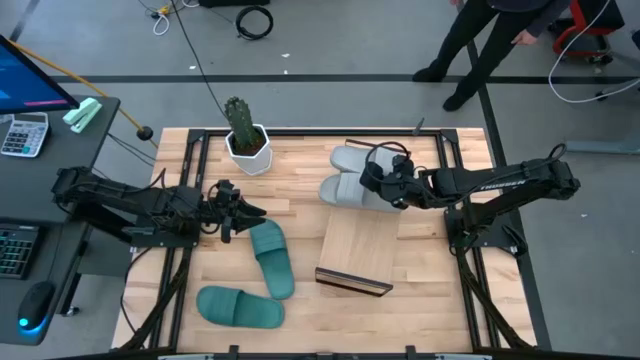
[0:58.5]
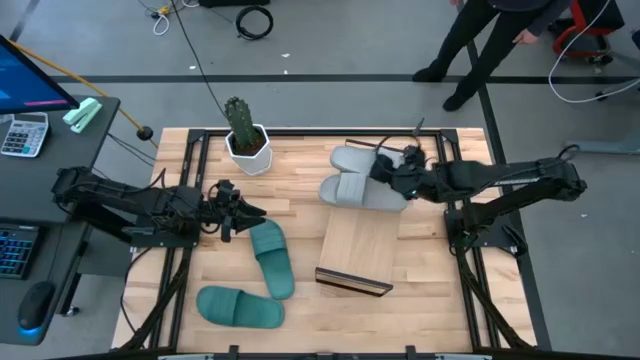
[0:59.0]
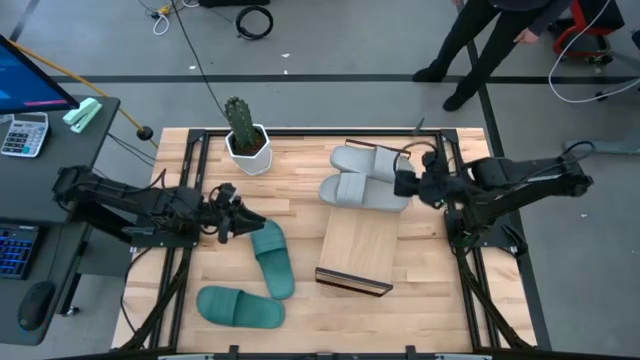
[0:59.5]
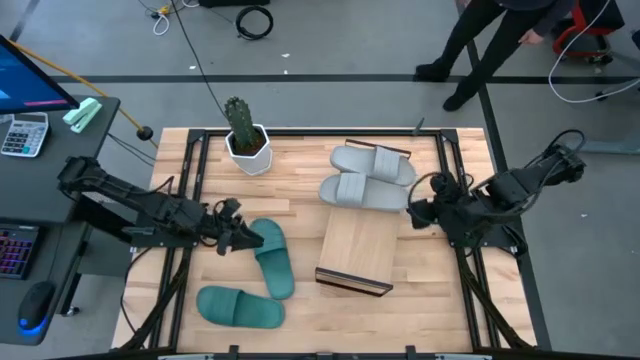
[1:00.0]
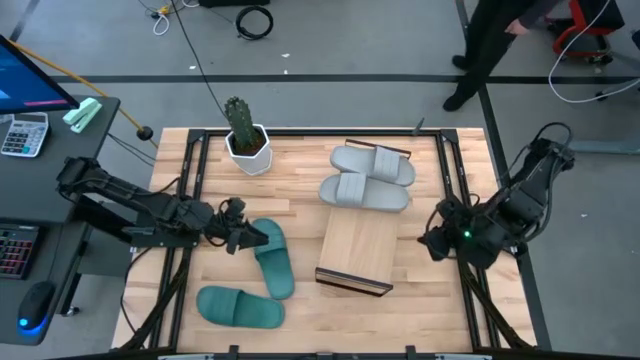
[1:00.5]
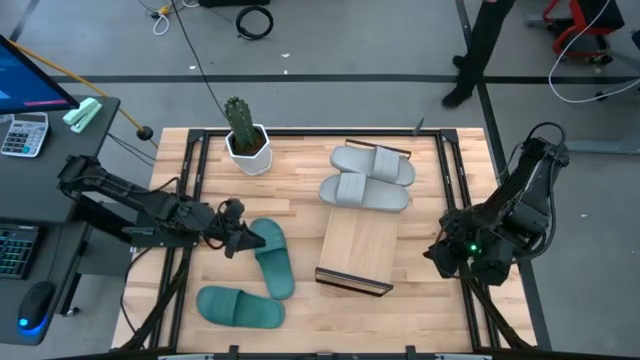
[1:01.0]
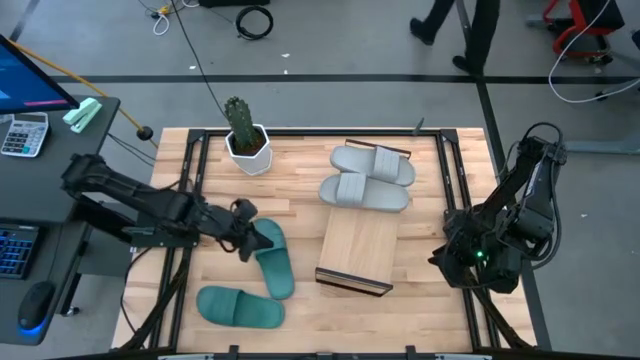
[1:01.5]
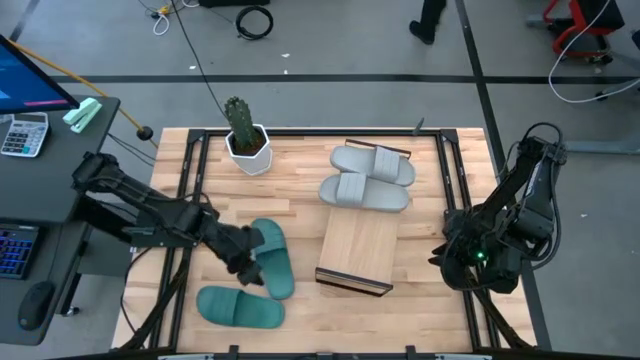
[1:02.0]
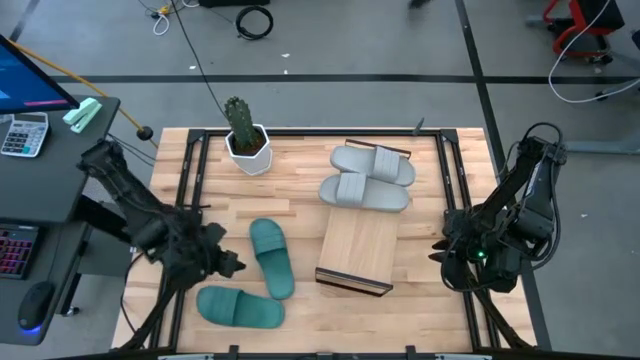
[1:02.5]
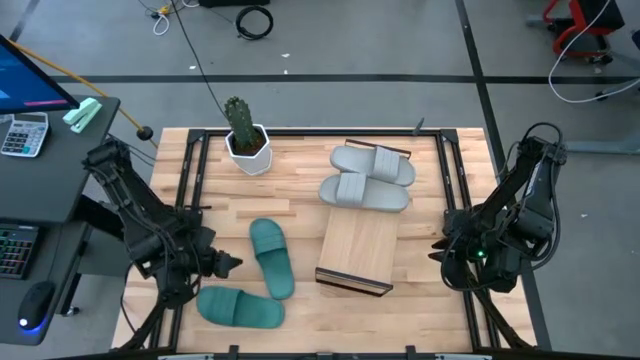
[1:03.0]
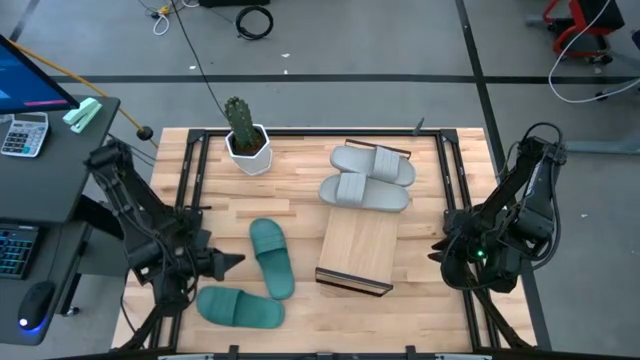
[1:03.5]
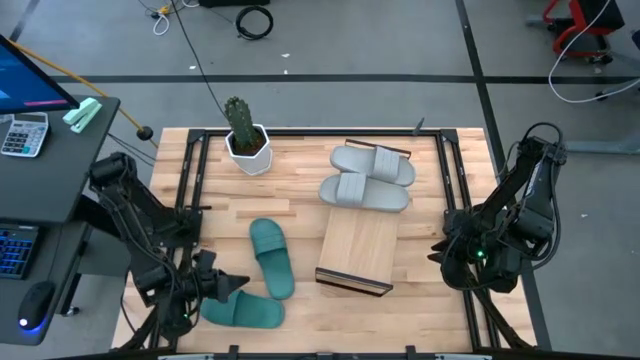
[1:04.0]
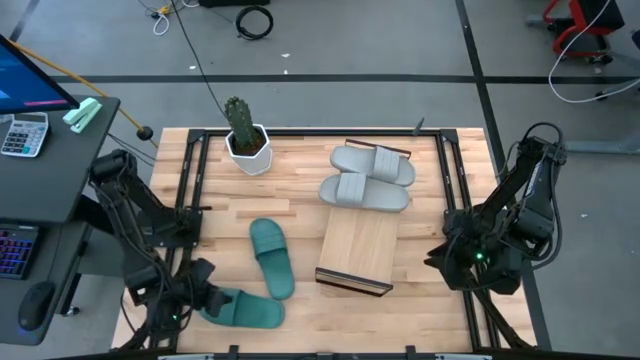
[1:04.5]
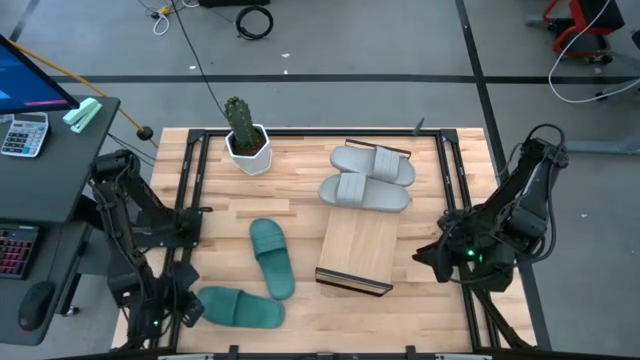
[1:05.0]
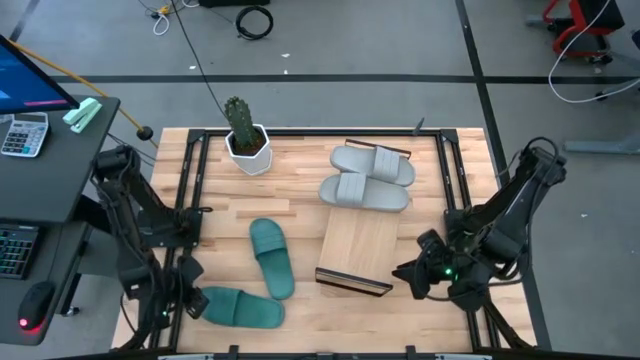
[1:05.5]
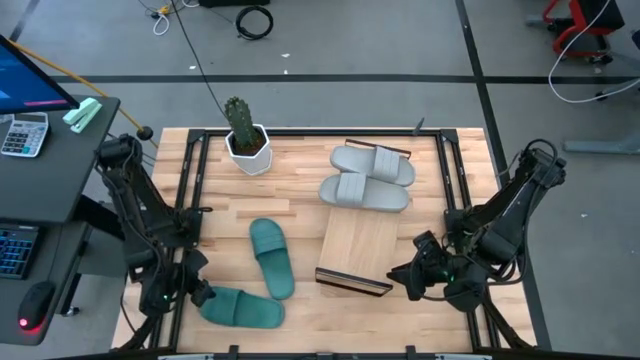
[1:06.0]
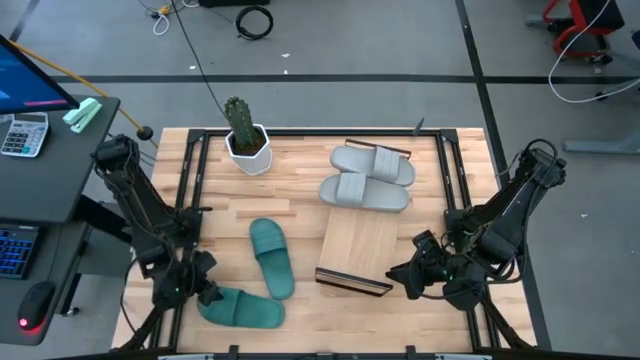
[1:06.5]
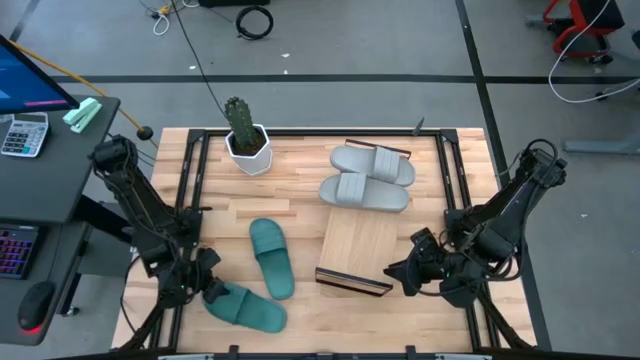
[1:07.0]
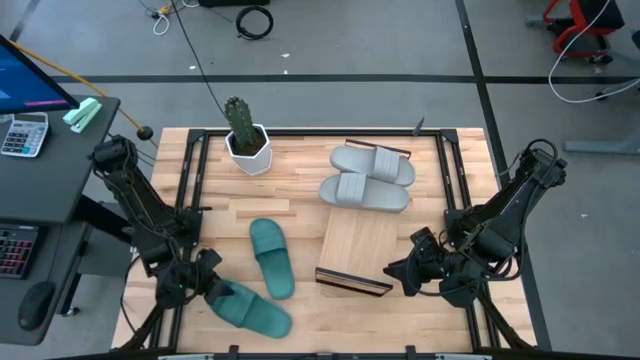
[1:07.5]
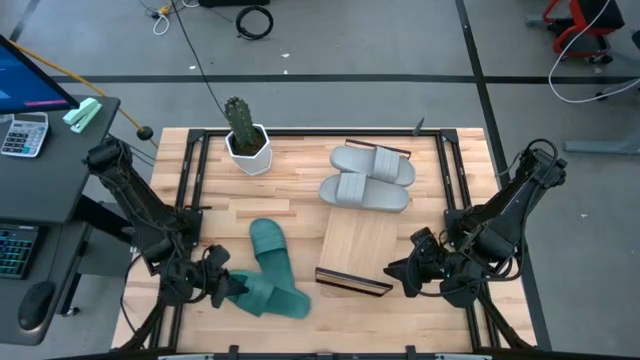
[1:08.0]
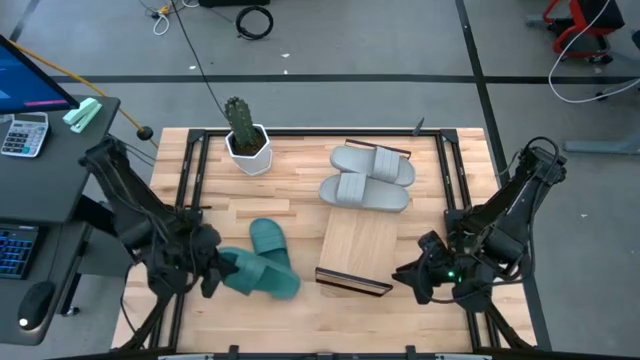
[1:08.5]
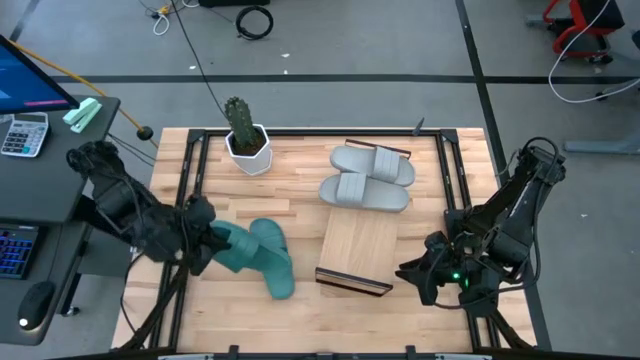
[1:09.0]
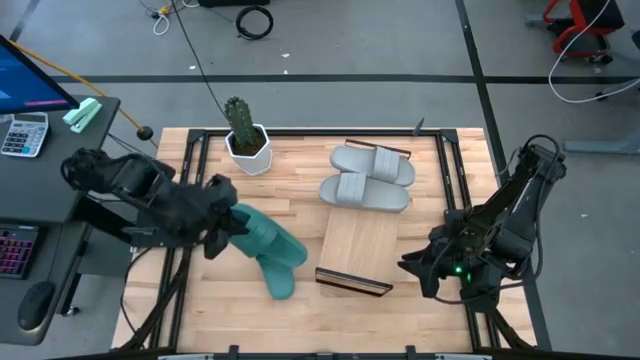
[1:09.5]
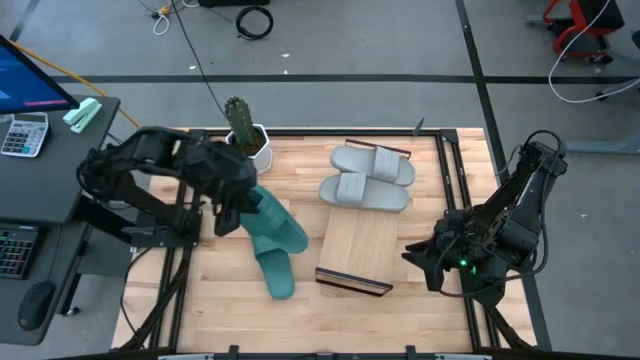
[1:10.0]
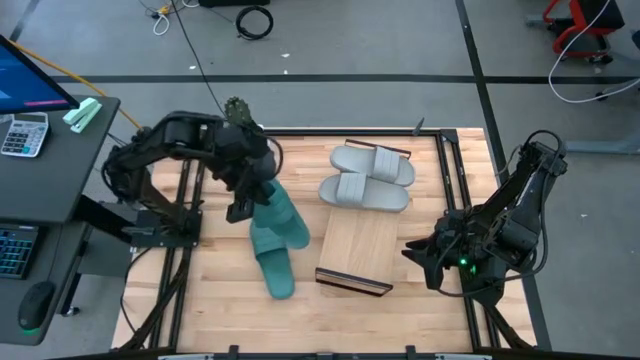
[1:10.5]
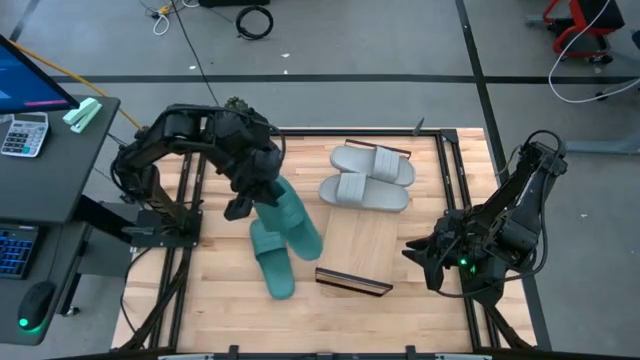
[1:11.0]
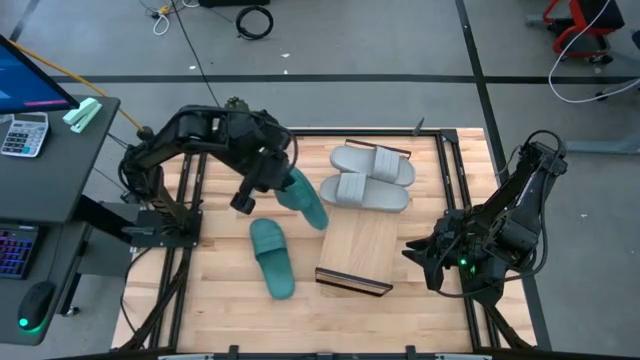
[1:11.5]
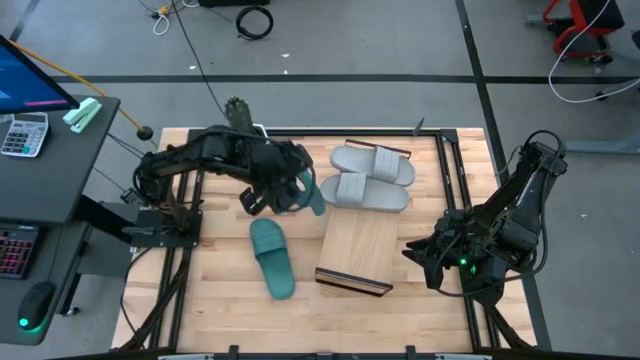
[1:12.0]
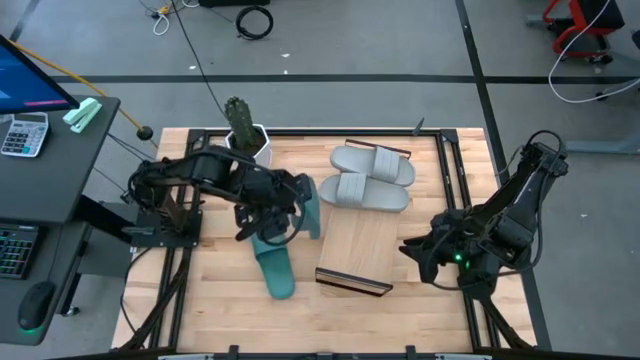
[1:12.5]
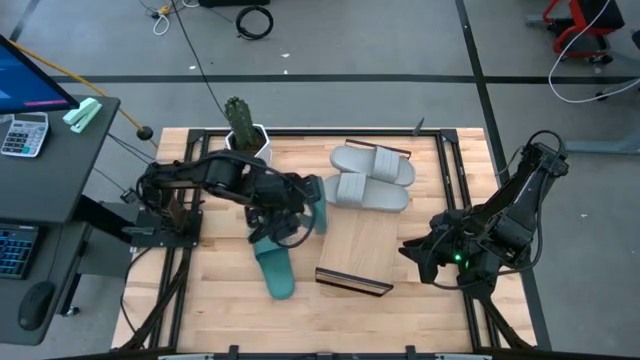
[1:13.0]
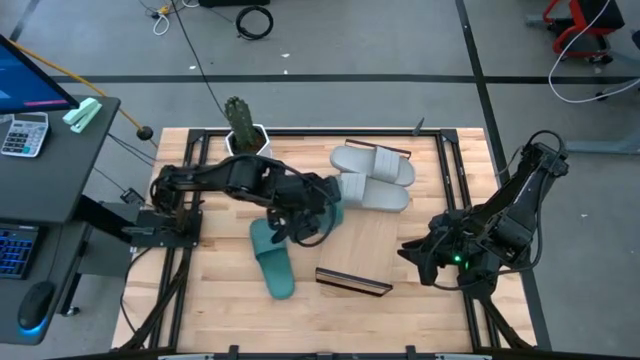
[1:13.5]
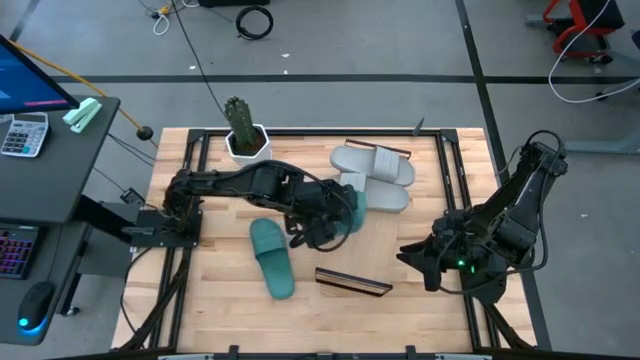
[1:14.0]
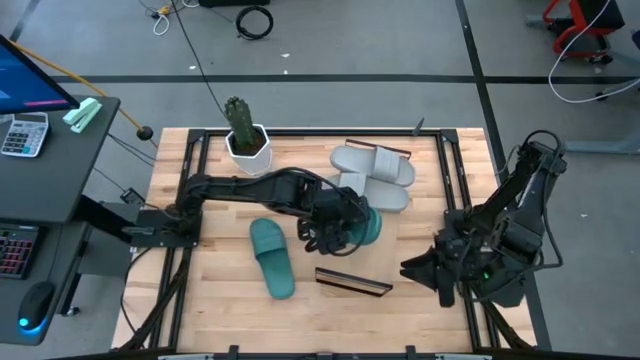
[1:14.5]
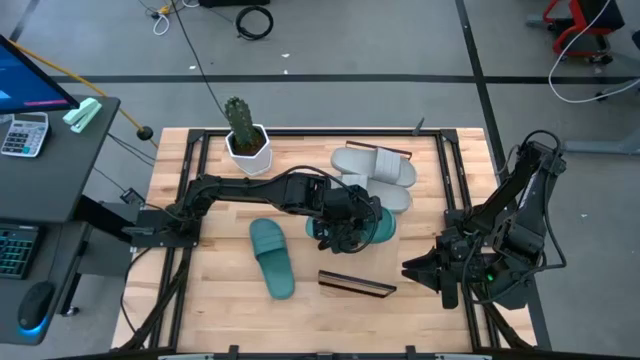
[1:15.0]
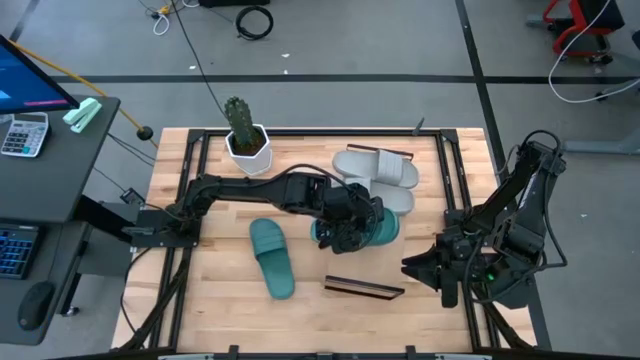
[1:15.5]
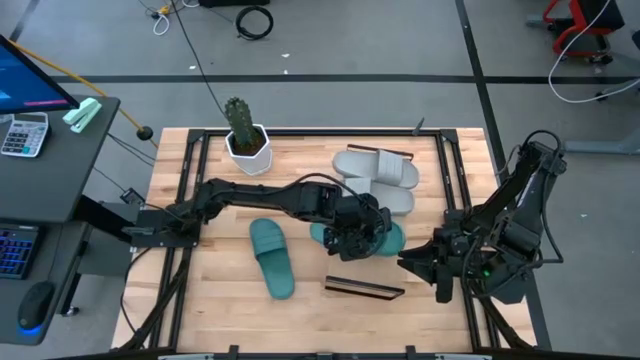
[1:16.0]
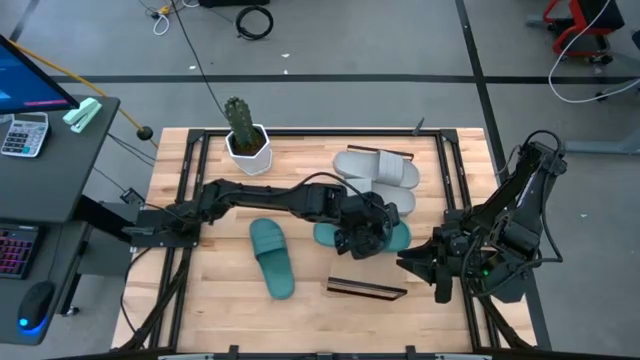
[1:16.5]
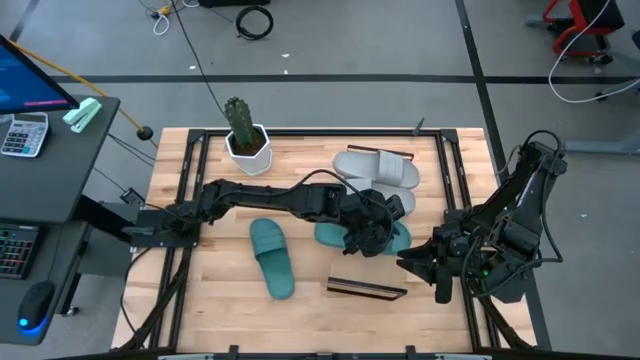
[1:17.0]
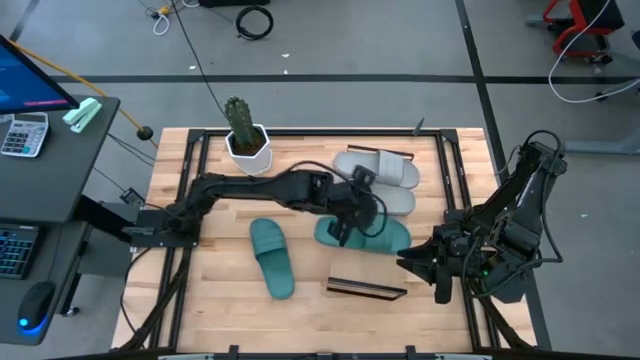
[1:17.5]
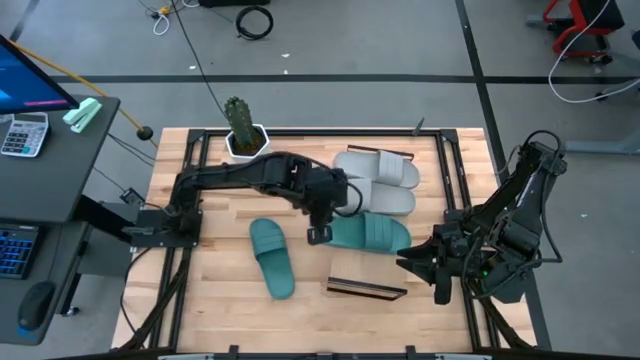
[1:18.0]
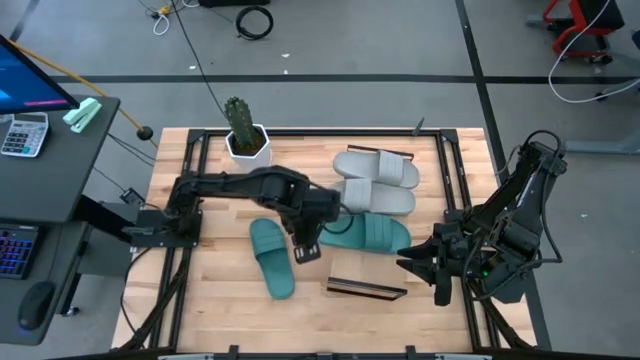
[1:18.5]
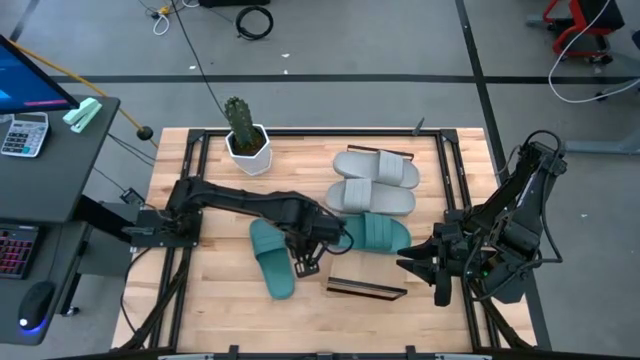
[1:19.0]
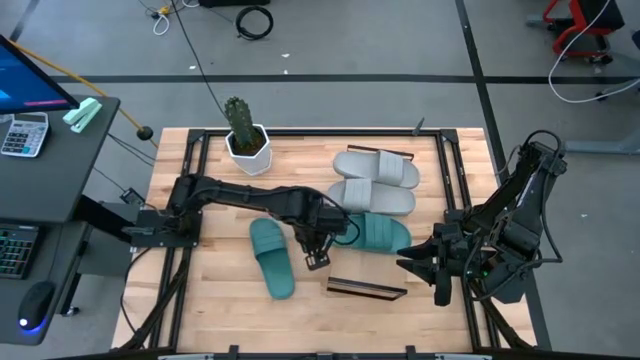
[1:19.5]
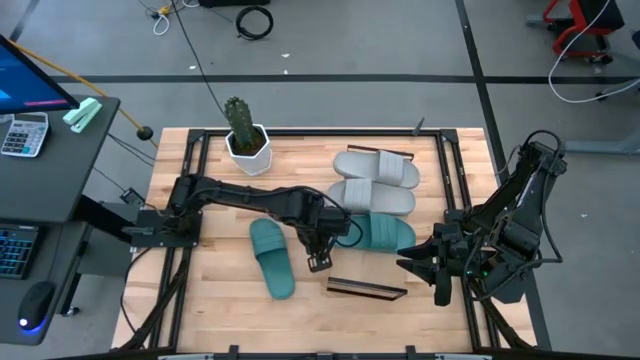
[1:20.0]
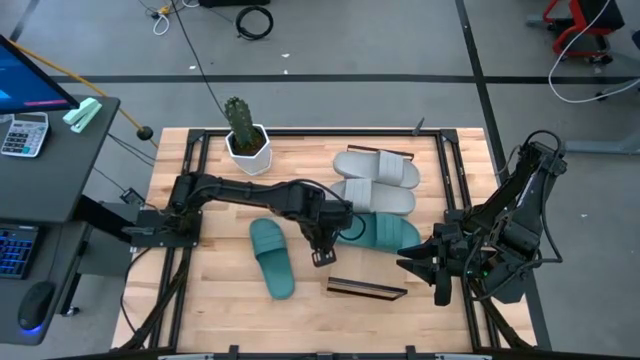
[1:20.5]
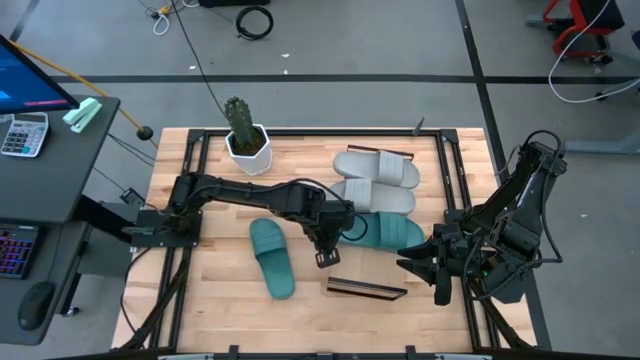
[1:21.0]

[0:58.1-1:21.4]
Task: Pick and place slides into the shelf
Put the bottom green slide on the shelf
